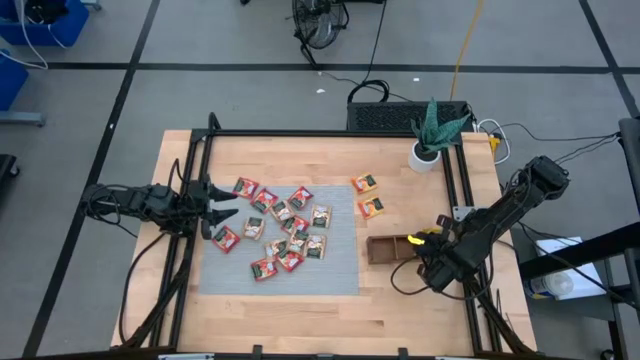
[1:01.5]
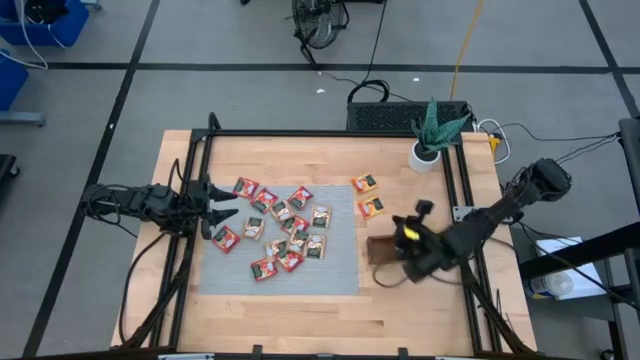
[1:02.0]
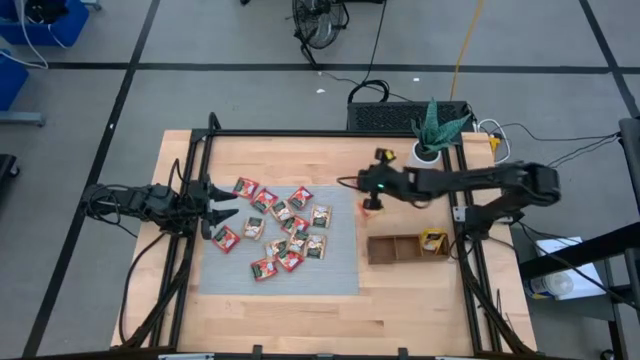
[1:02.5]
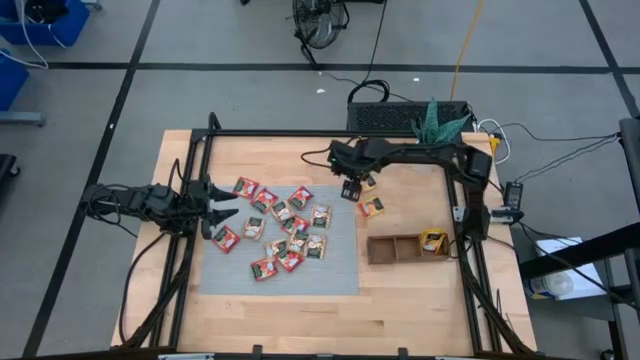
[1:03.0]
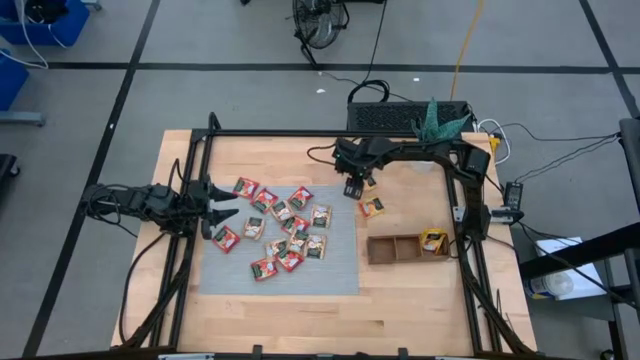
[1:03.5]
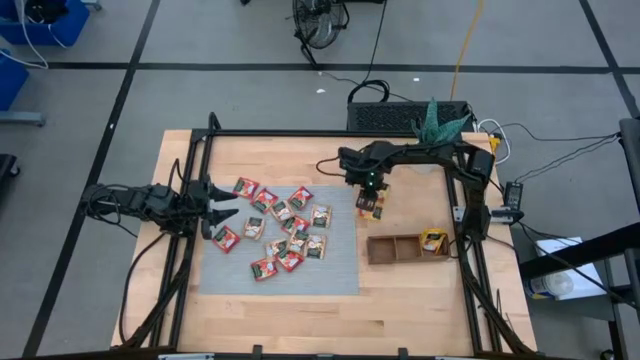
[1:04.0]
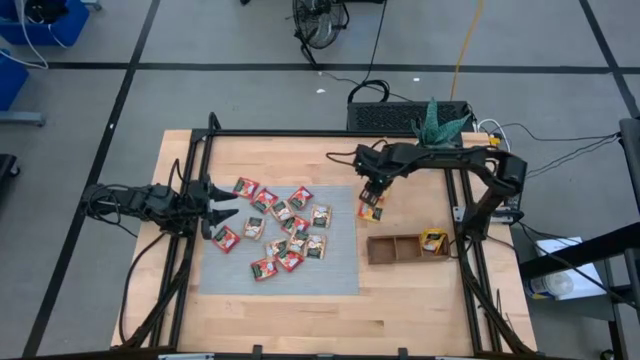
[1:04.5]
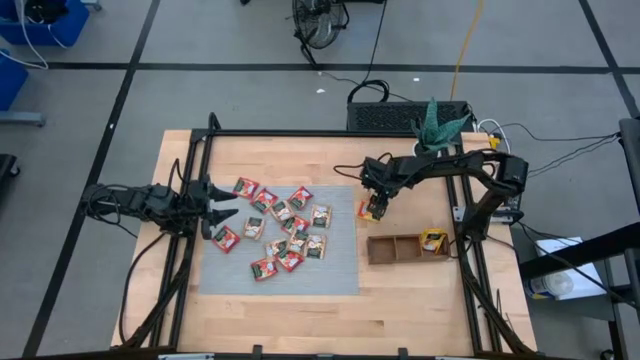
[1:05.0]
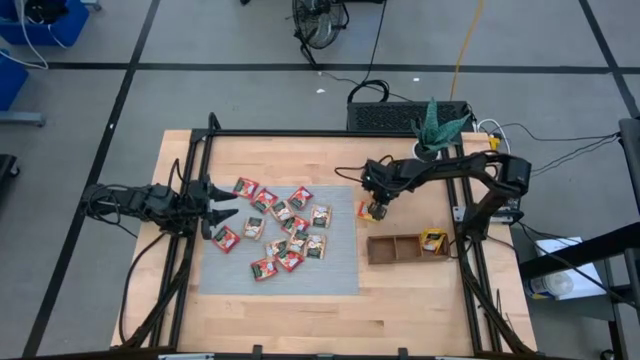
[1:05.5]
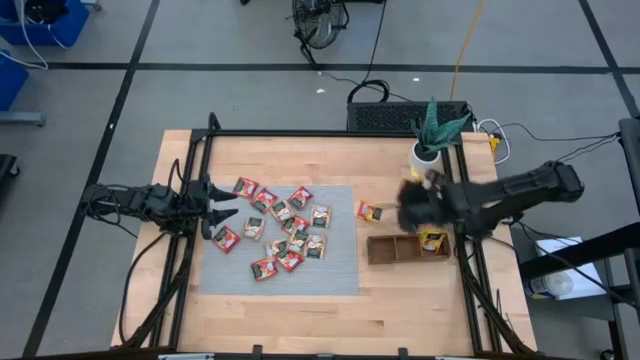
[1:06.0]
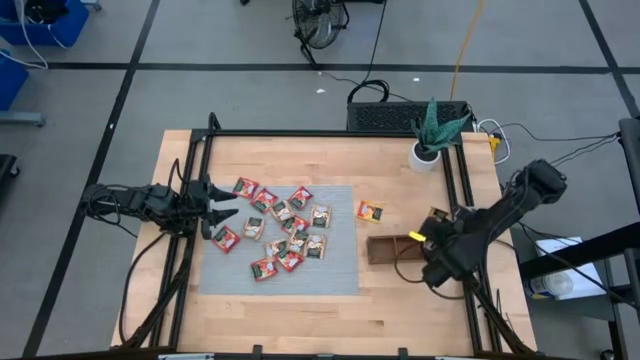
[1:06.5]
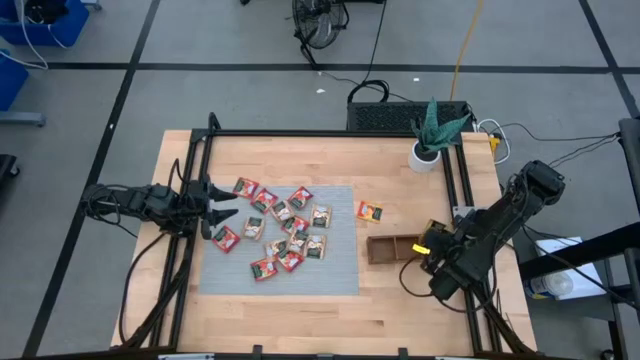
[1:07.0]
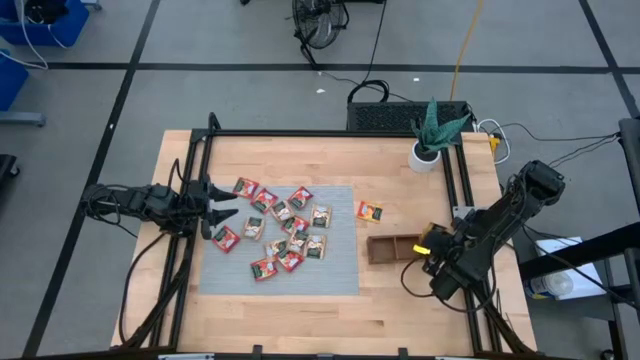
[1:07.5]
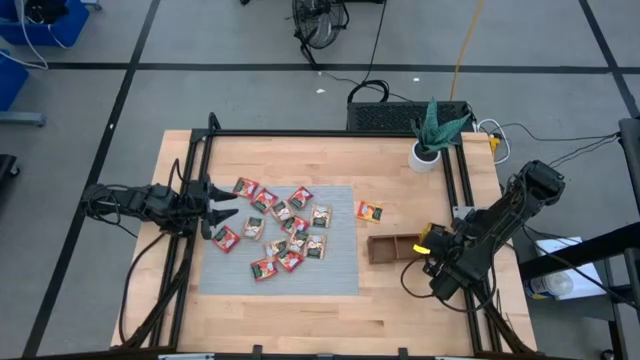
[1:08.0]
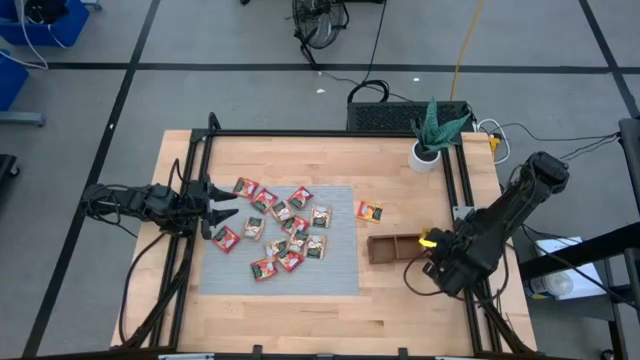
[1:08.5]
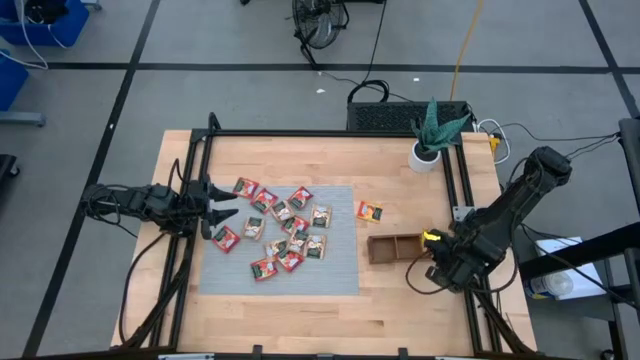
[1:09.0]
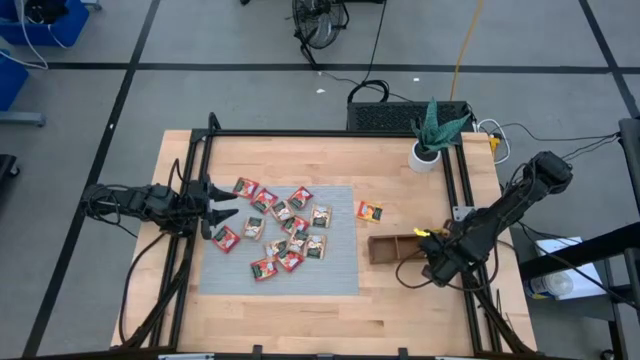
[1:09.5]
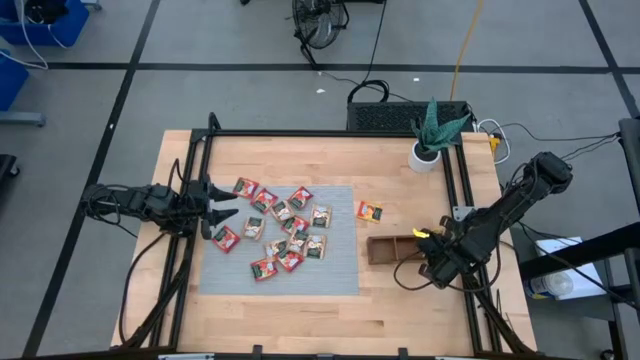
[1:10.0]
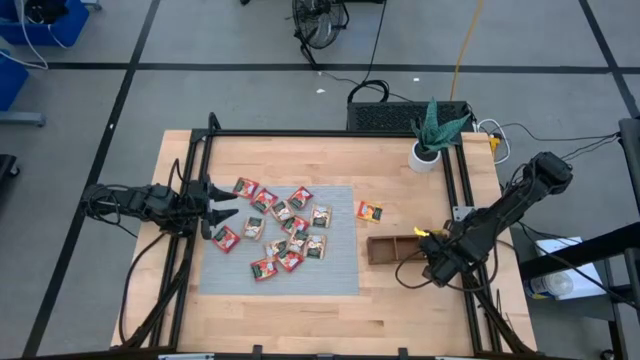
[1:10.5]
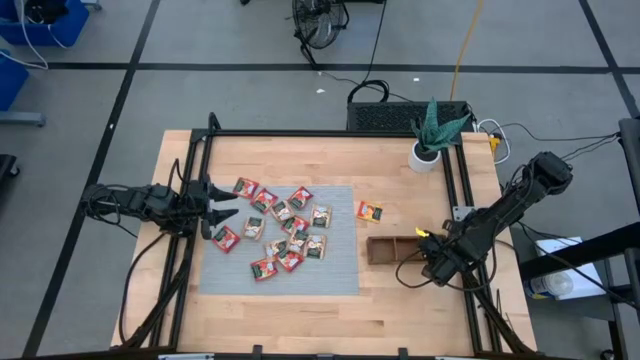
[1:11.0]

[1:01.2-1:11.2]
Task: Pick & Place Tea
Put the yellow tea bag into the right section of the wooden organizer

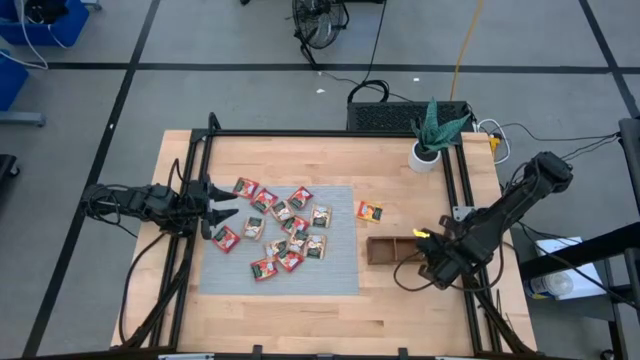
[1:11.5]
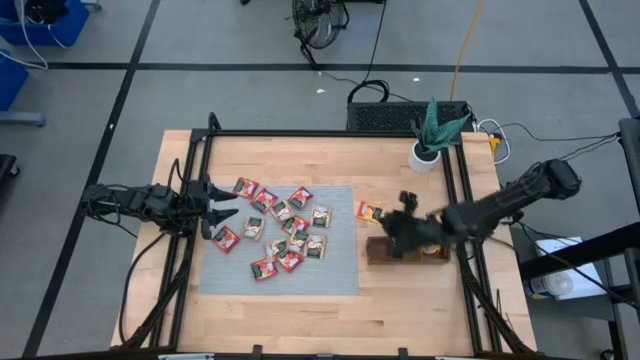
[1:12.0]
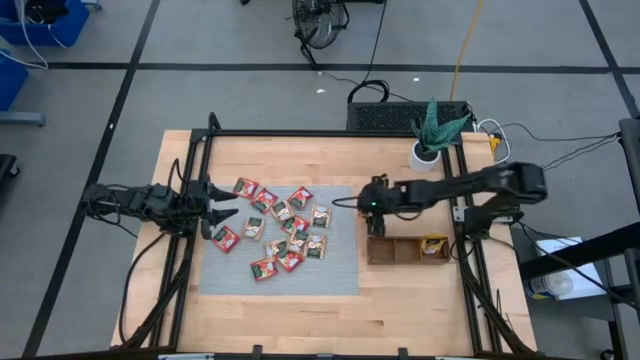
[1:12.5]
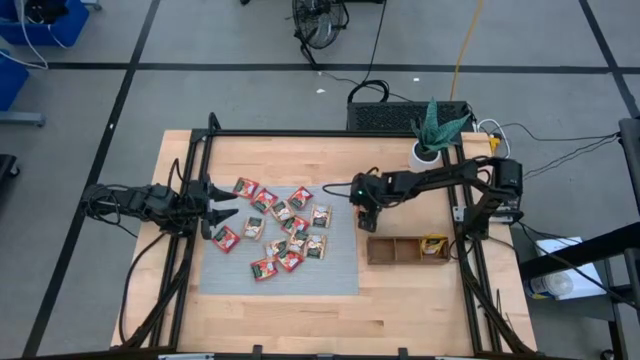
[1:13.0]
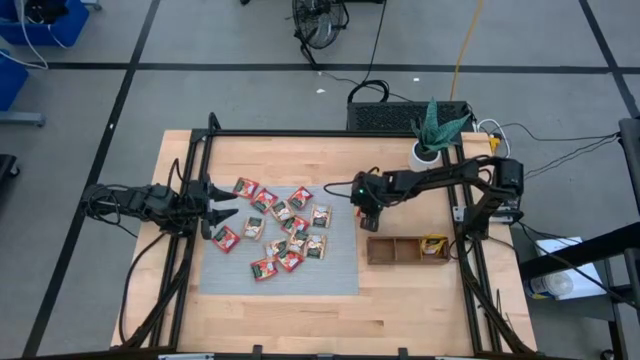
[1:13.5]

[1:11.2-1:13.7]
Put the yellow tea bag into the right section of the wooden organizer

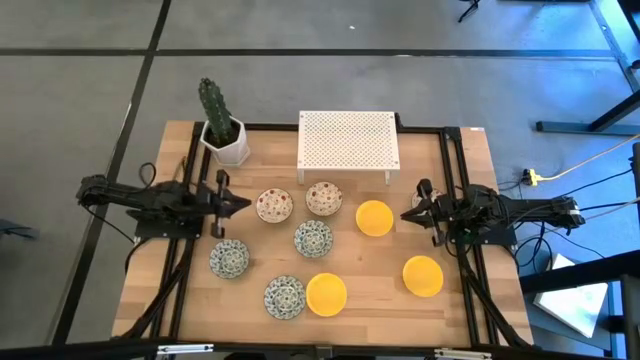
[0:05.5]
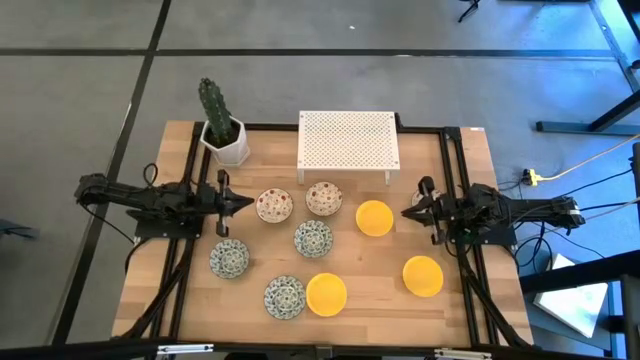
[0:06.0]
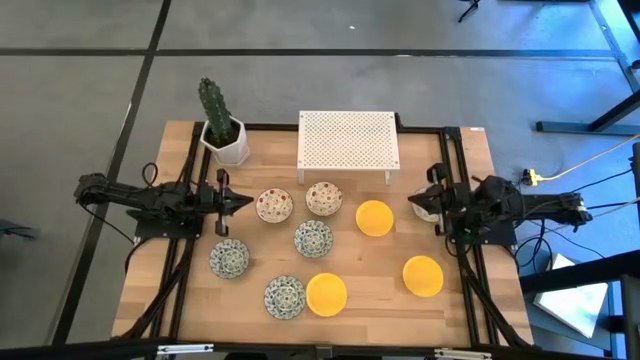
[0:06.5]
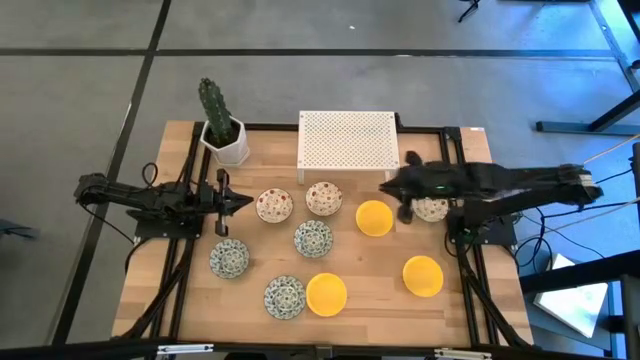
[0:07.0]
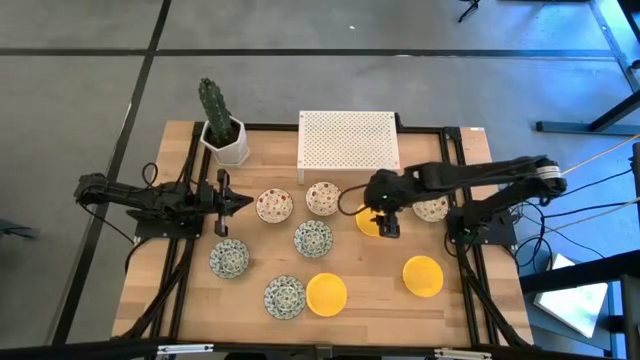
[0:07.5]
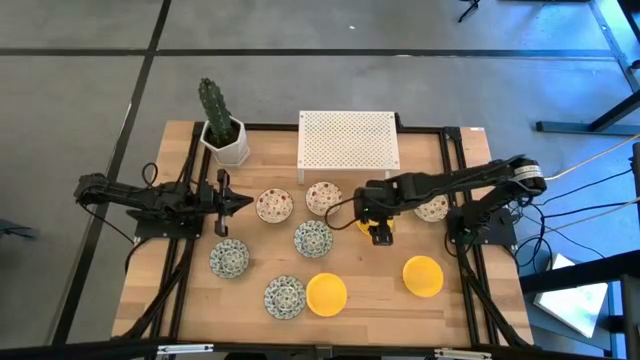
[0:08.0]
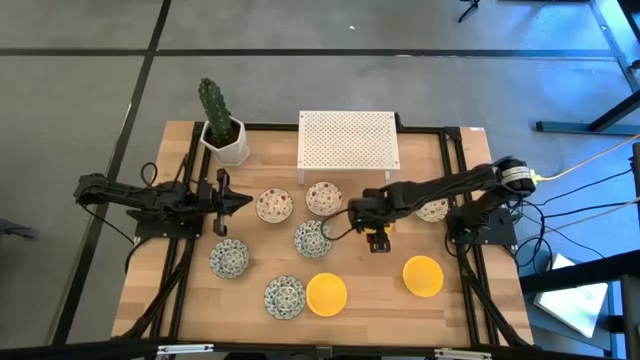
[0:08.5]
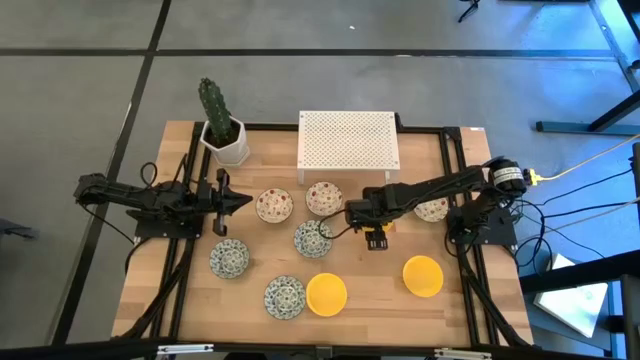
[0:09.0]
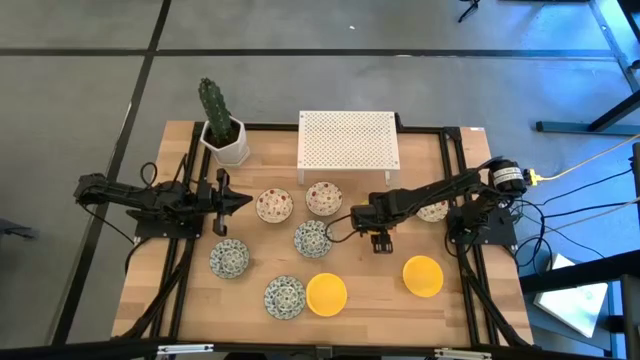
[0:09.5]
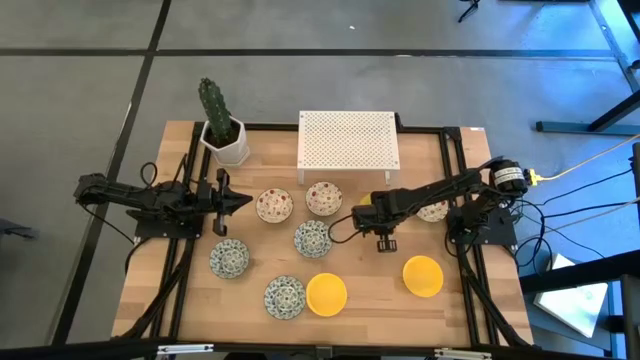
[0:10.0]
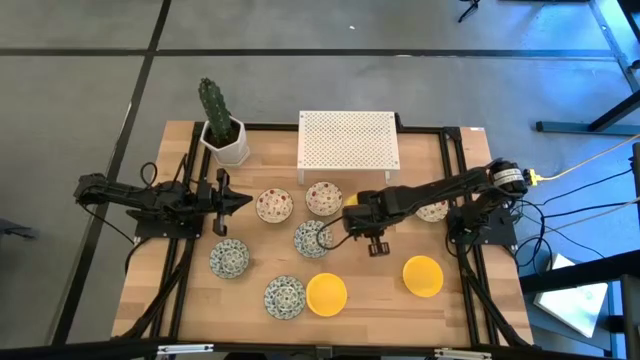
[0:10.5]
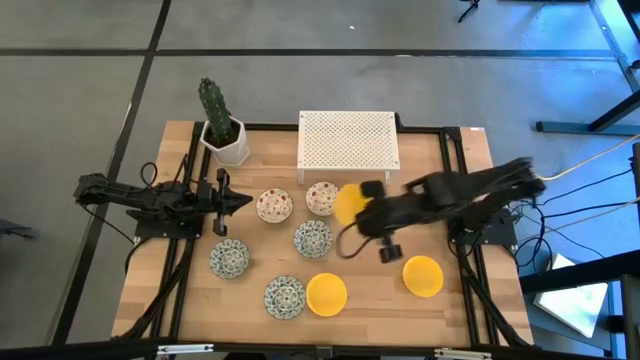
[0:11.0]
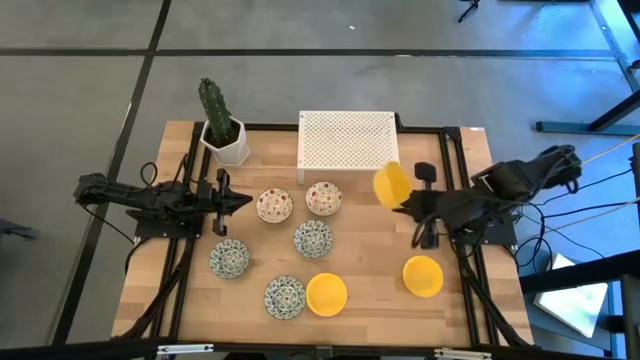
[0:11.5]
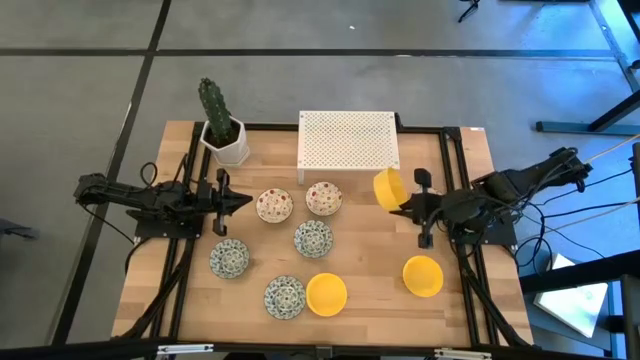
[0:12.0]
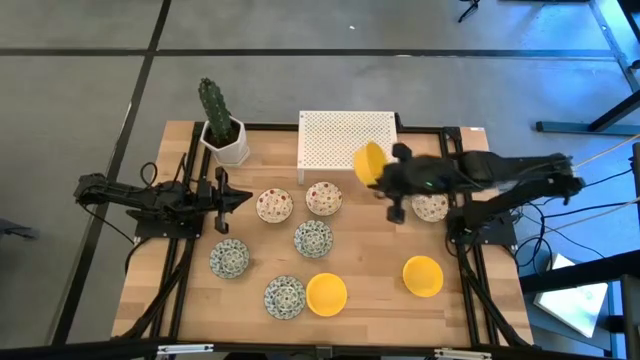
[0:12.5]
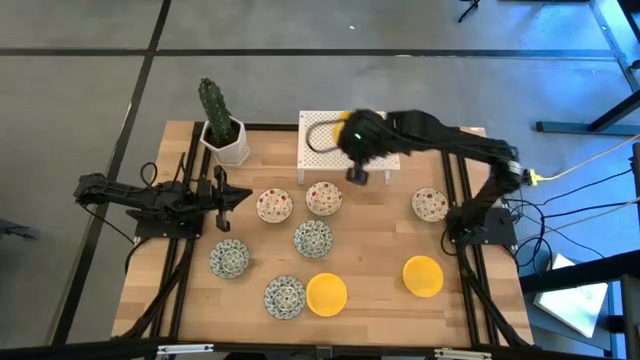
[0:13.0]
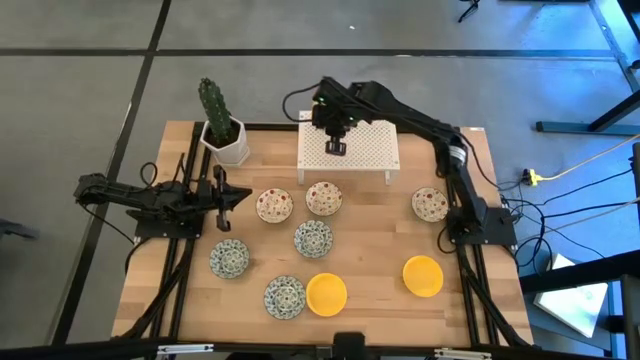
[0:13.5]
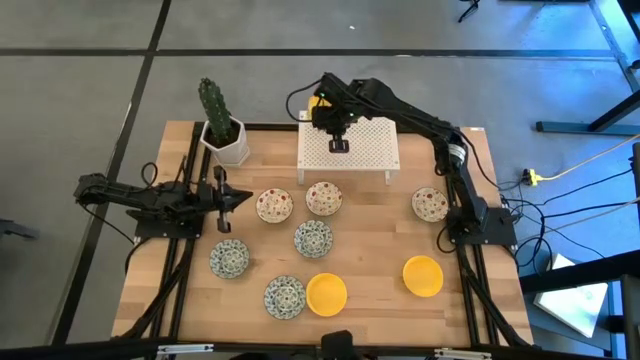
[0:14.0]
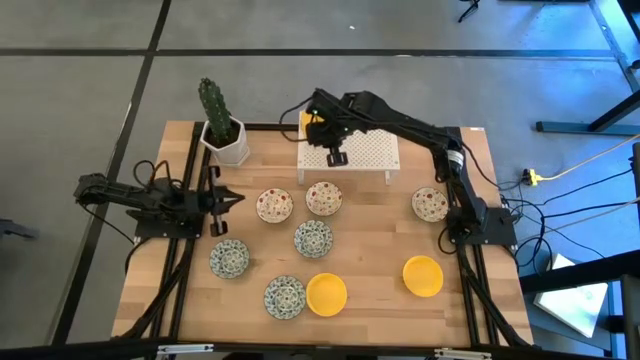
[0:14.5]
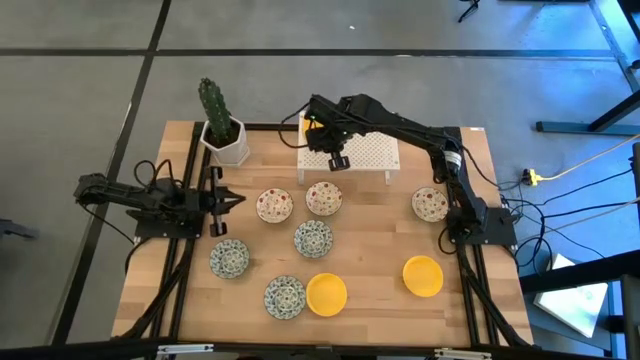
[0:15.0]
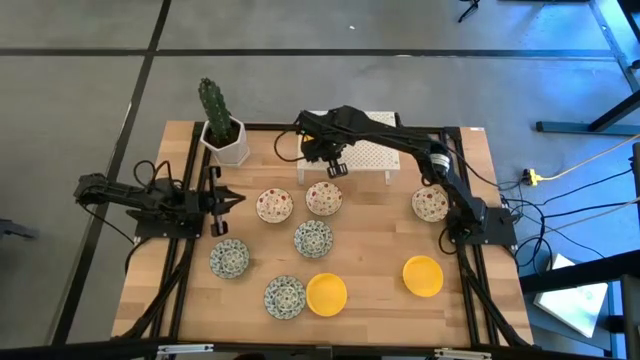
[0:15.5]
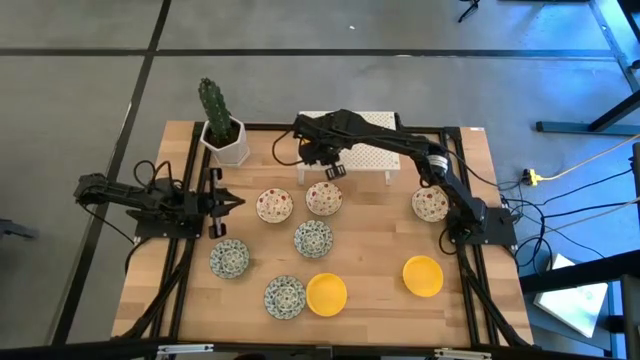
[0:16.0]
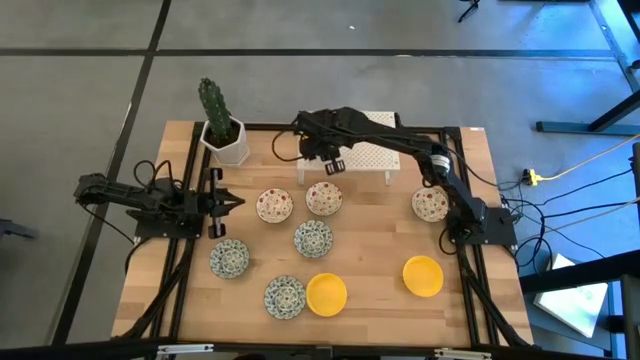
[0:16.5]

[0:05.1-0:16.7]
Task: Pick & Place Mini bowls
Put the top yellow bowl on the shelf
